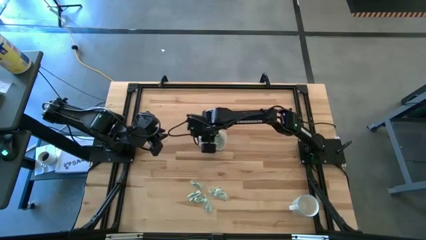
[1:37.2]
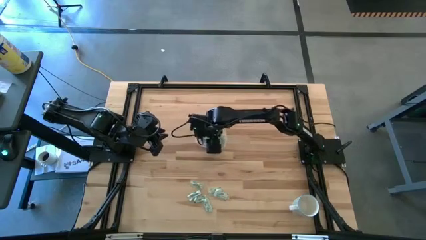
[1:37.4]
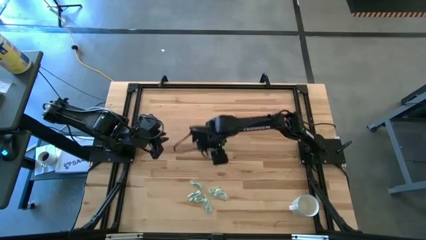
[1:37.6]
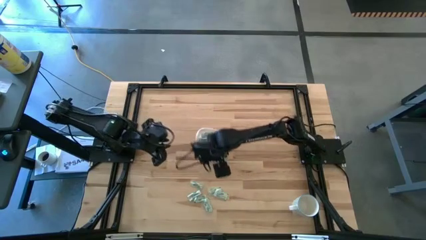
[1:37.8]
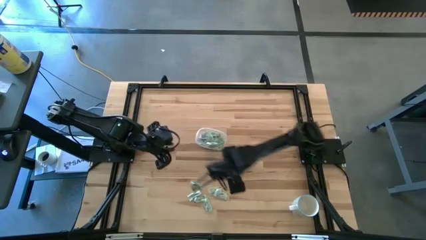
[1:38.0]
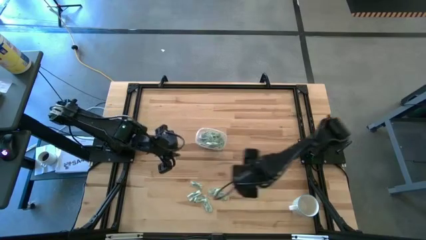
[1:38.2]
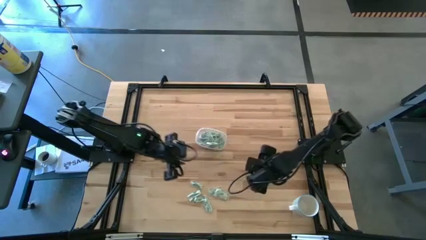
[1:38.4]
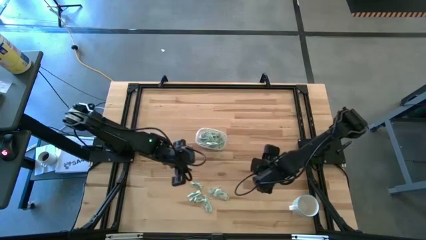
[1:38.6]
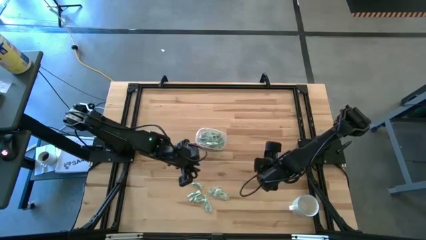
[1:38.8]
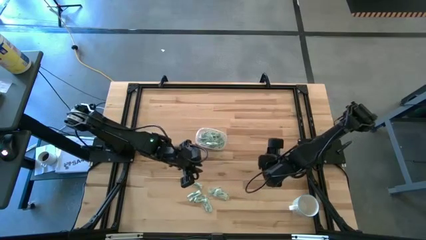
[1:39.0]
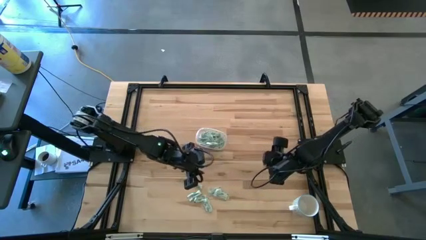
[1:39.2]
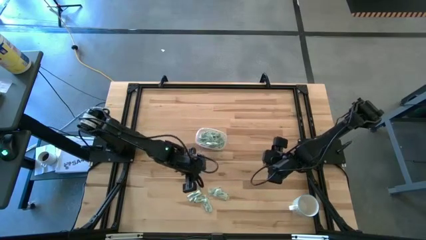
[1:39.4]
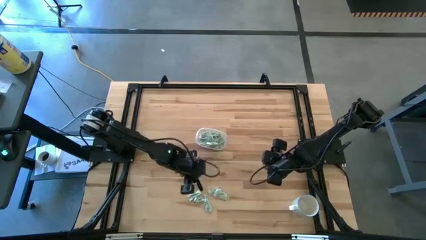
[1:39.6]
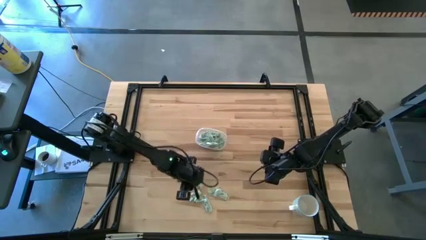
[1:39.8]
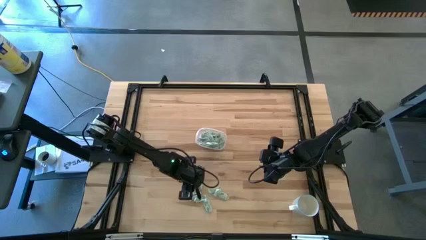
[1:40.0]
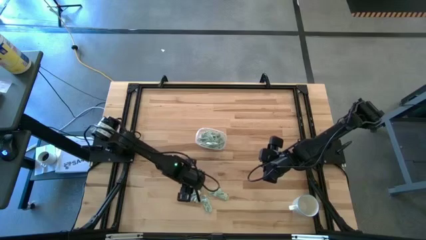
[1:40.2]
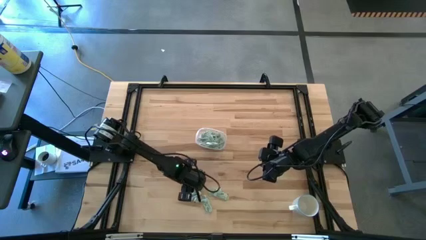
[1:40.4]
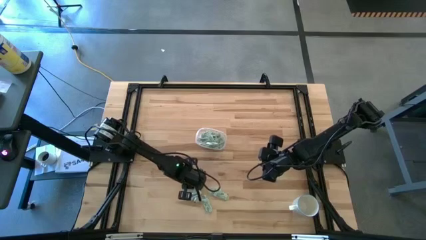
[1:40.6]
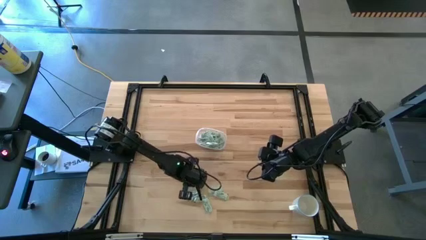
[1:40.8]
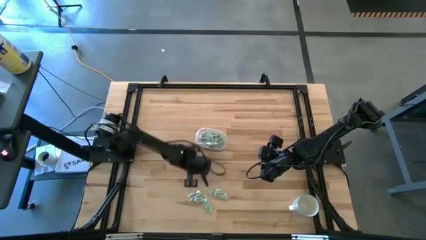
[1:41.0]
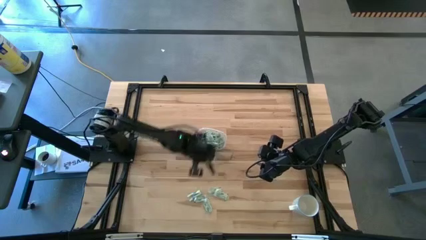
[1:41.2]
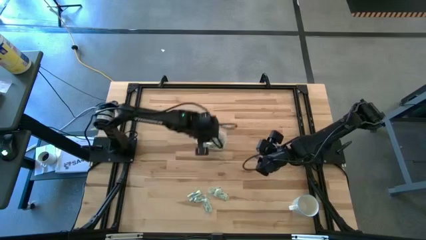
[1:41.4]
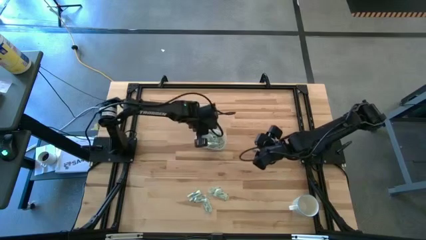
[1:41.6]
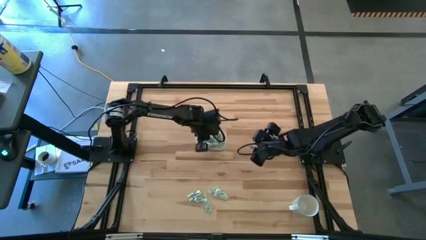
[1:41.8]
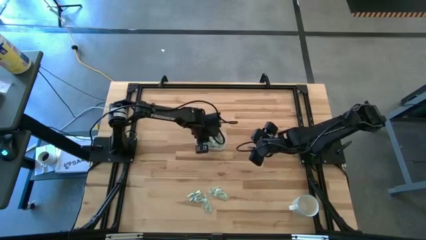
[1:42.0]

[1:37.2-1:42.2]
Task: Pick and place Stevia / Truvia into bins
Put the stevia packet into the transparent container

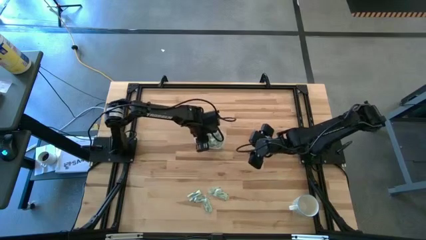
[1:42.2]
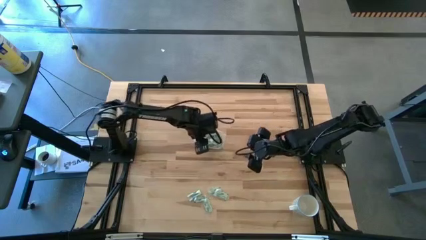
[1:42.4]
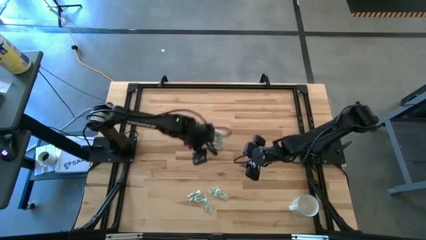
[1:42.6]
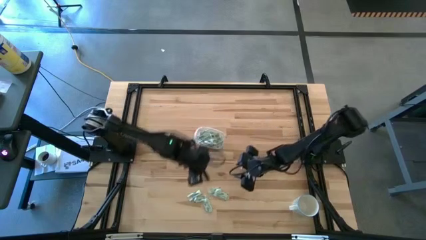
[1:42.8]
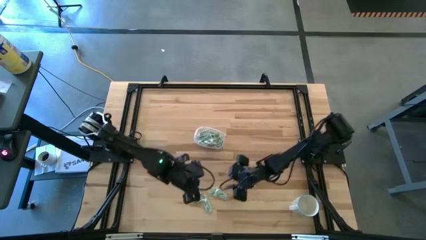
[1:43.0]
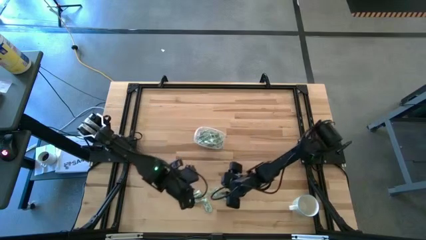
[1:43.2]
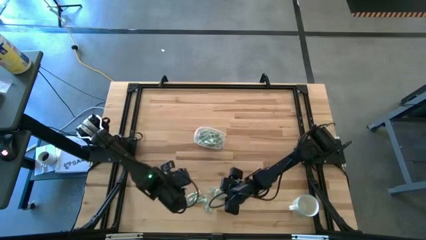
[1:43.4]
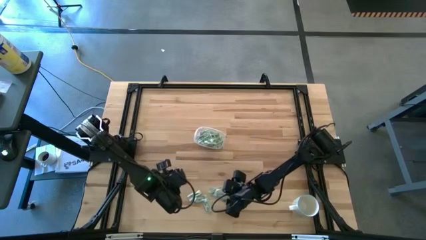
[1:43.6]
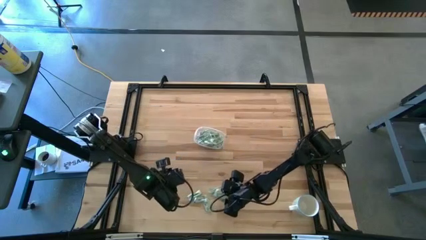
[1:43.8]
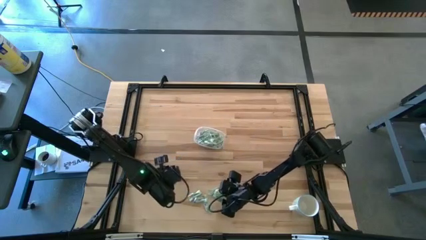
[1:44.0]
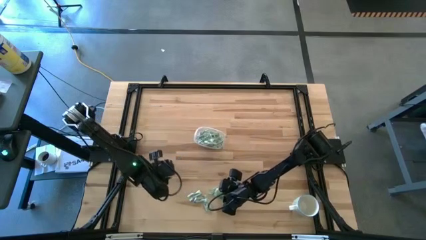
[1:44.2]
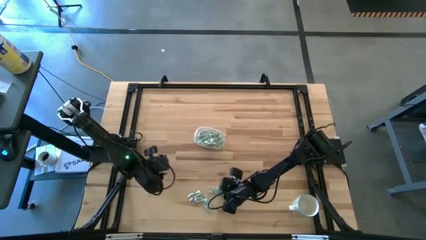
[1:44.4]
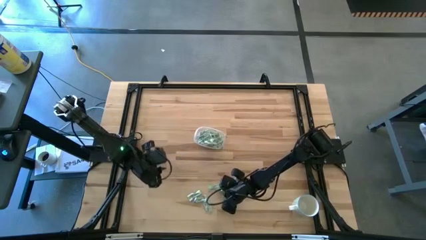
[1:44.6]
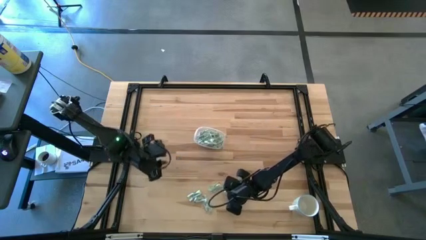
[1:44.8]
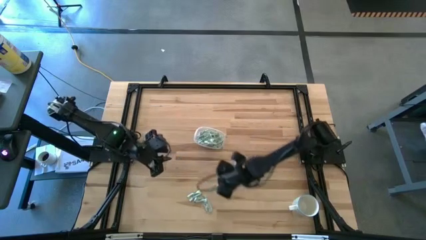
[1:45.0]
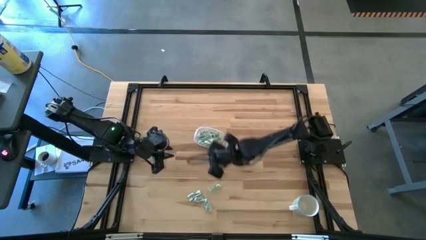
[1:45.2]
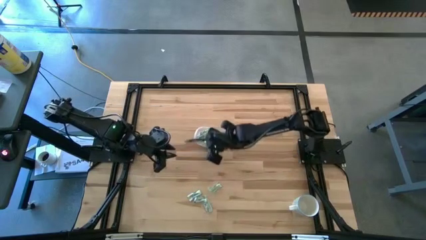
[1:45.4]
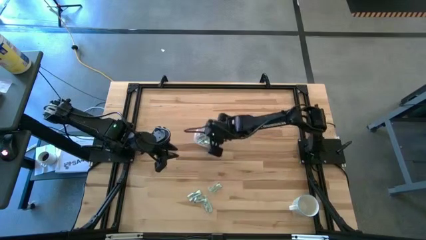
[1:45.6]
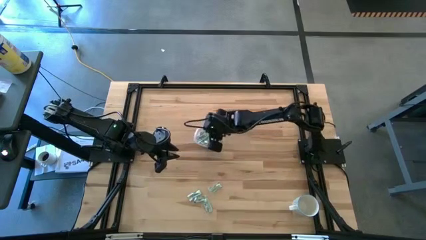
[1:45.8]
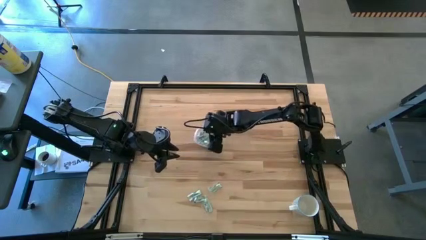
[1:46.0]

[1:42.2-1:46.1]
Put the stevia packet into the transparent container

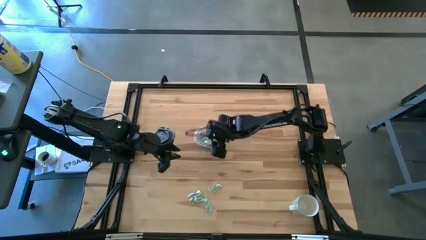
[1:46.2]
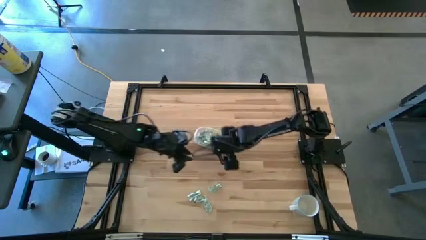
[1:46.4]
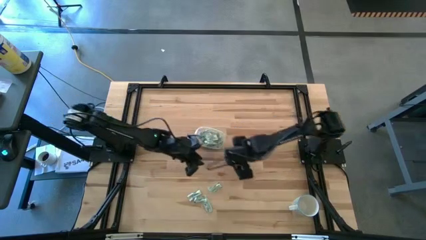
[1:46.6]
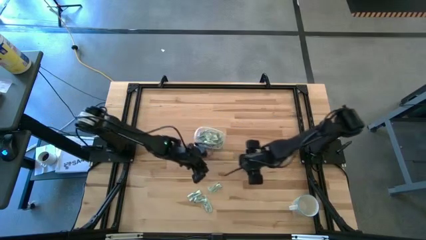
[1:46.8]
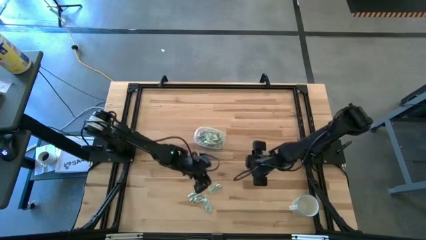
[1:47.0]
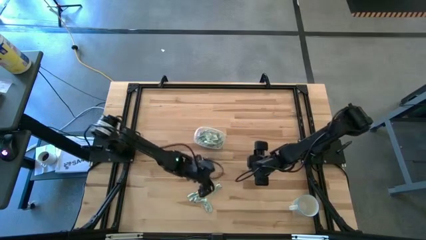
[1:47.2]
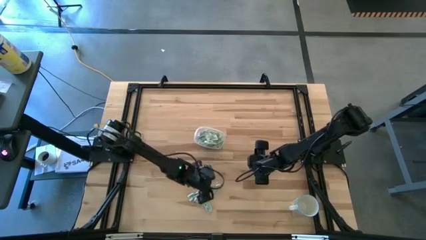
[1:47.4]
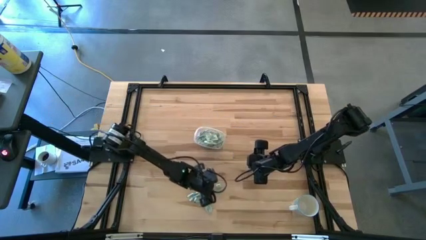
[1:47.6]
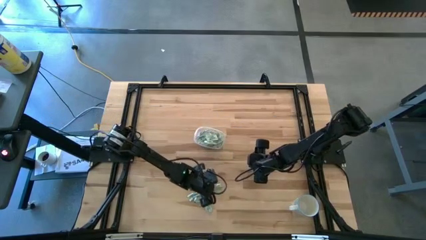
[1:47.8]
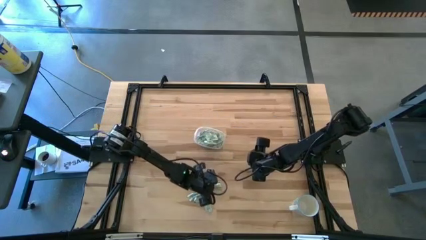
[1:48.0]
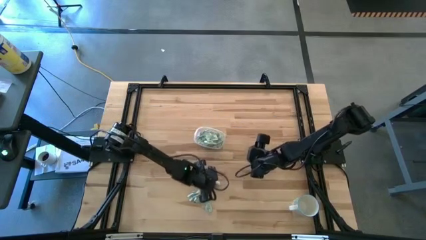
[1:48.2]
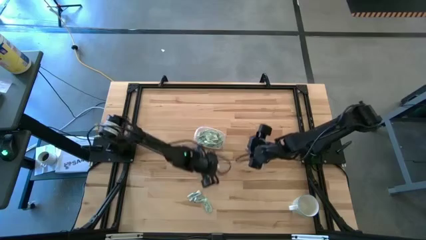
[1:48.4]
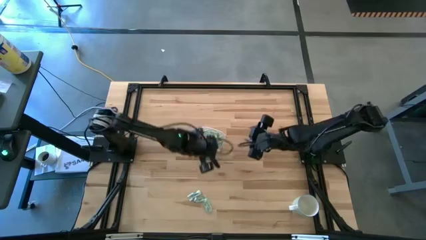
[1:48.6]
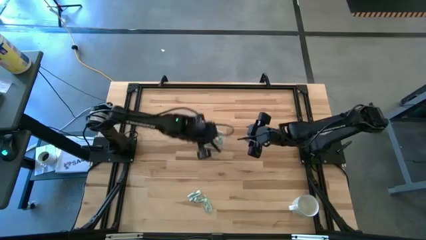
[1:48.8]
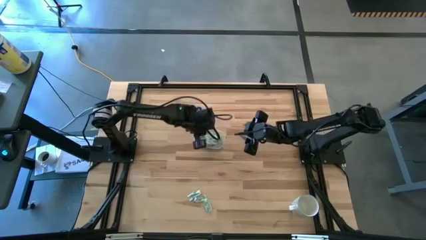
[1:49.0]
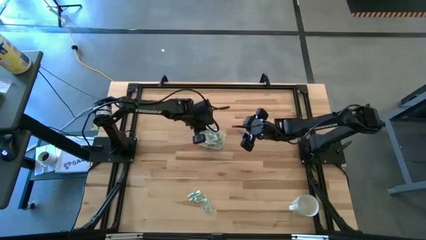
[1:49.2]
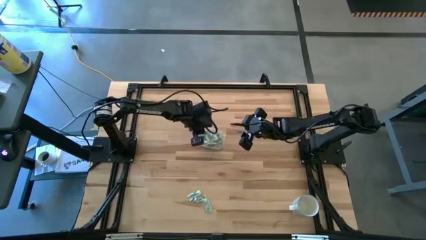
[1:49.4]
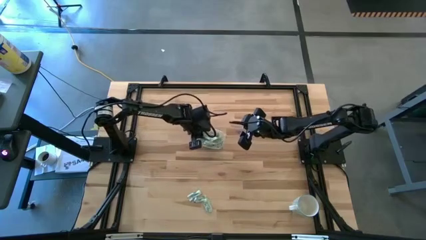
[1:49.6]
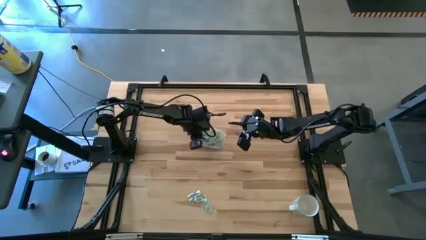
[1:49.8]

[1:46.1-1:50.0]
Put the stevia packet into the transparent container

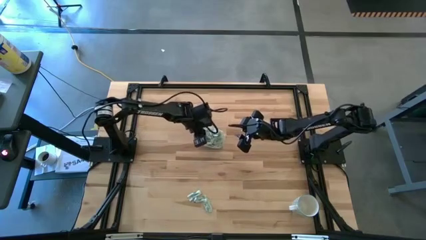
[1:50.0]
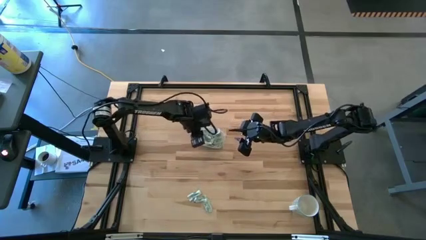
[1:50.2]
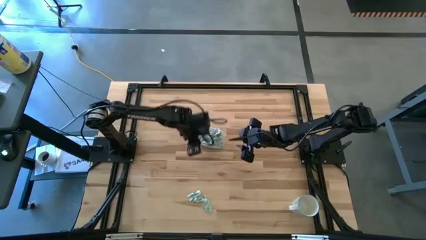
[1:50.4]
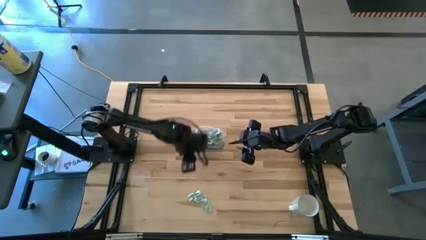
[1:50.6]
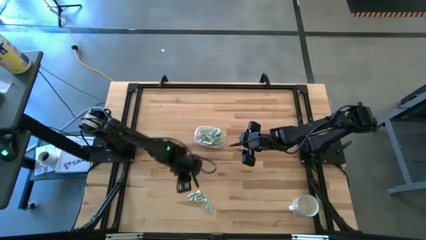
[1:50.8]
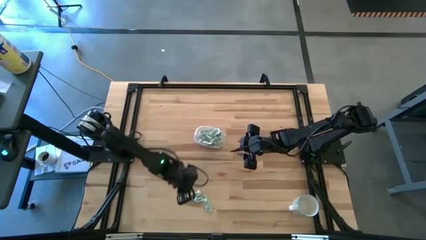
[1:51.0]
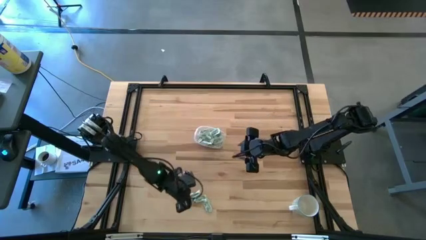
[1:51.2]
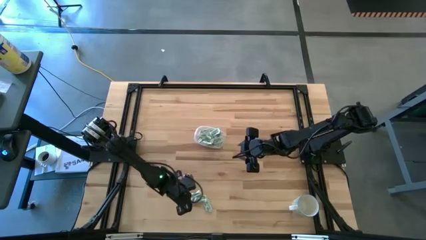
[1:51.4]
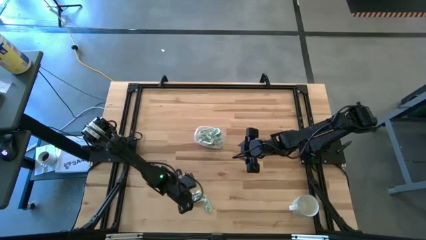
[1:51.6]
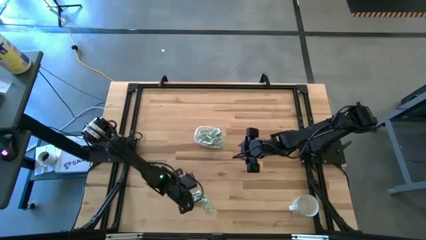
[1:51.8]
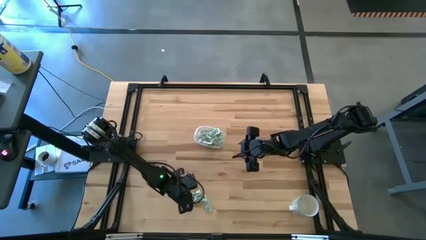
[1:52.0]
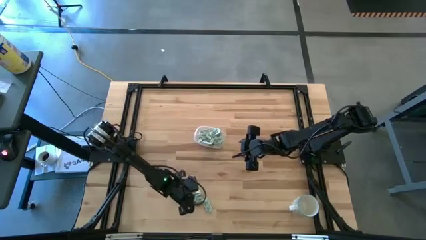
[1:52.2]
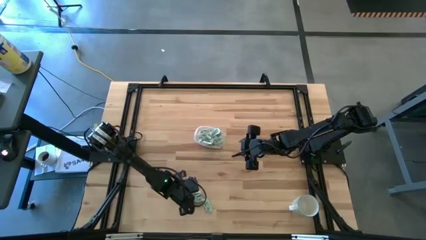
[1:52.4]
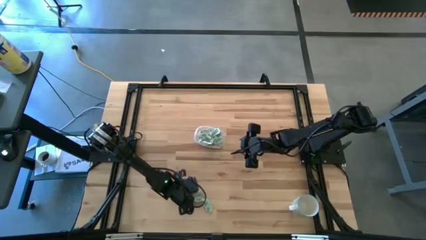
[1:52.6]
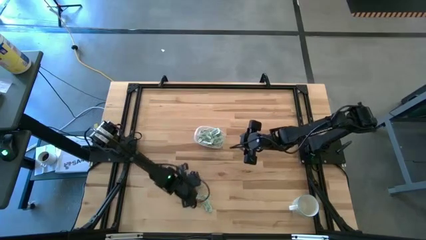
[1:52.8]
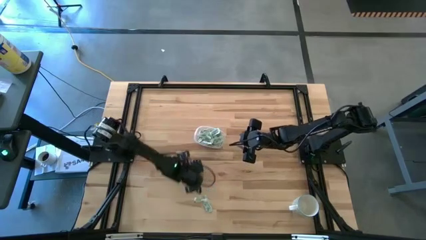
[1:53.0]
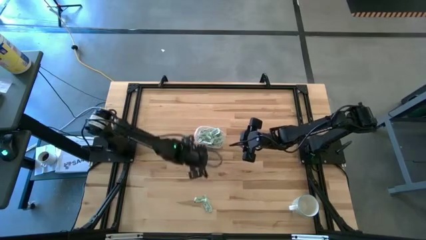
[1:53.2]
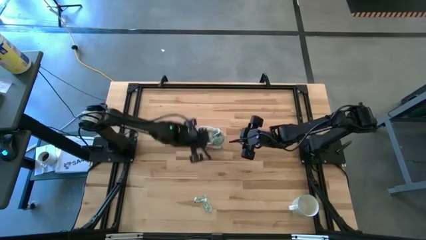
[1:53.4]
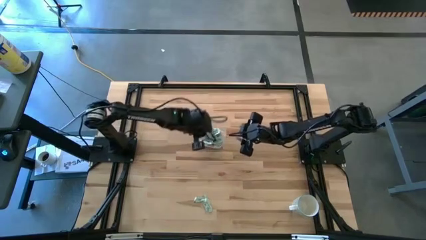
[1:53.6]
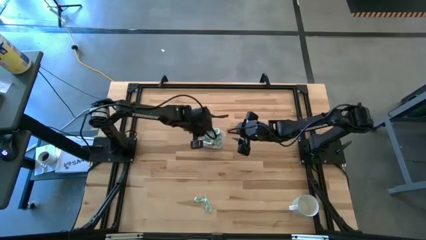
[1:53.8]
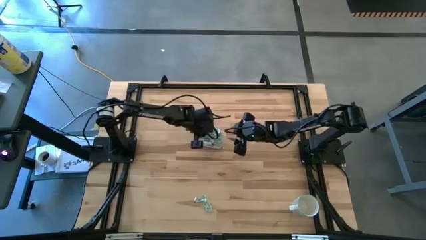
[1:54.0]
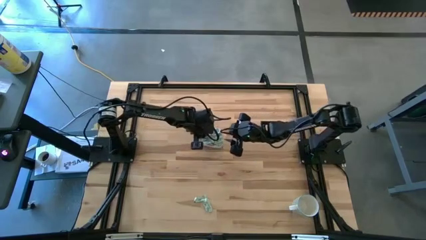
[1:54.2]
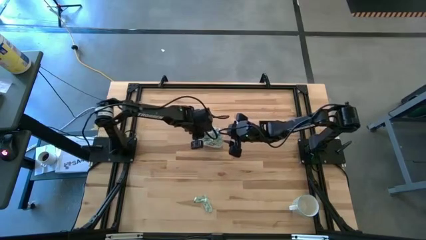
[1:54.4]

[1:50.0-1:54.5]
Put the stevia packet into the transparent container
